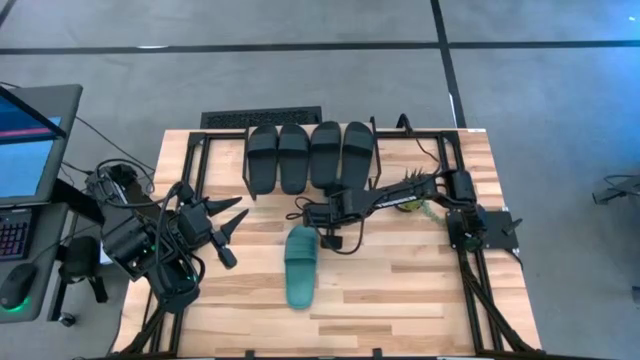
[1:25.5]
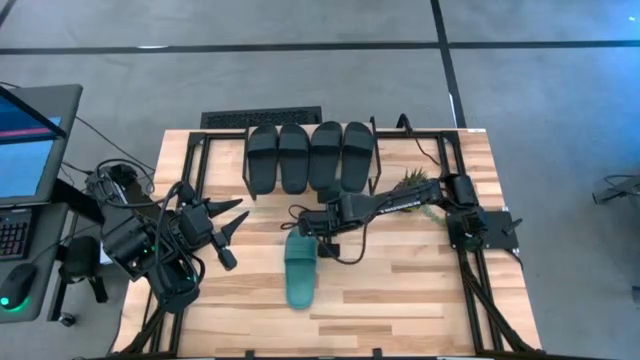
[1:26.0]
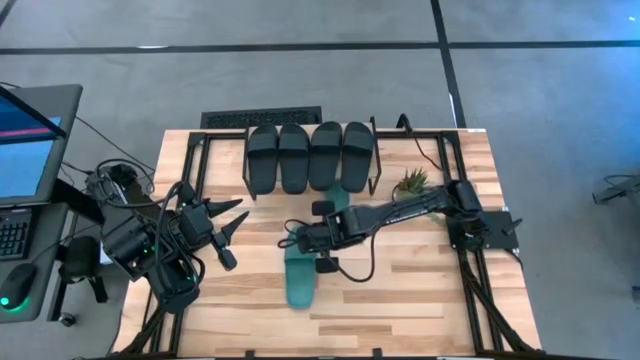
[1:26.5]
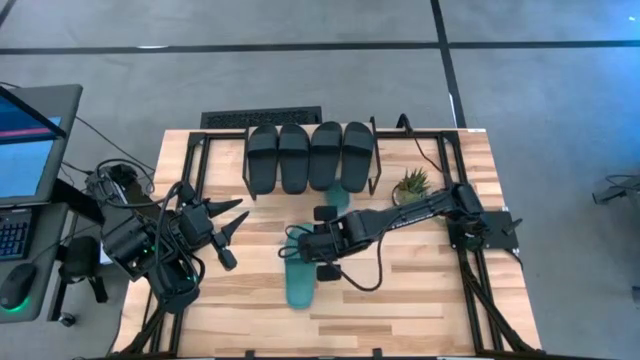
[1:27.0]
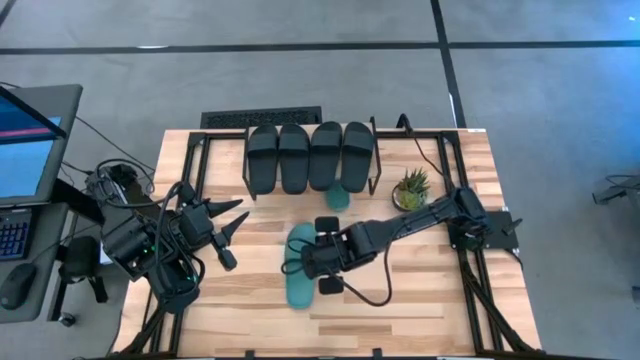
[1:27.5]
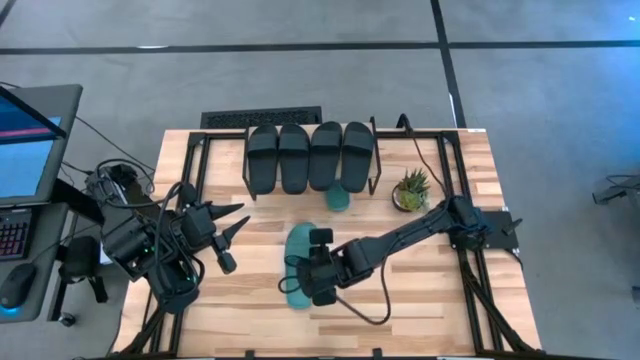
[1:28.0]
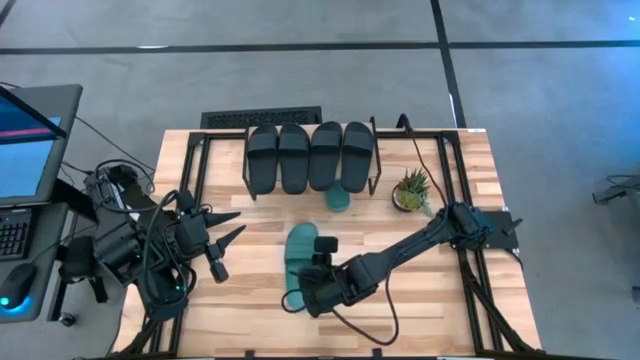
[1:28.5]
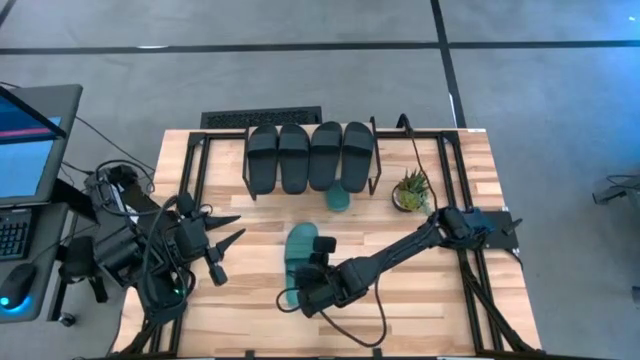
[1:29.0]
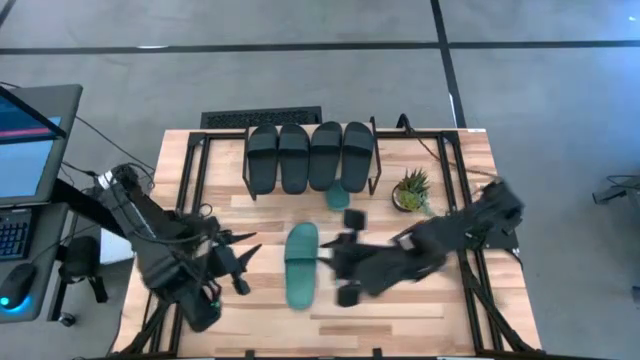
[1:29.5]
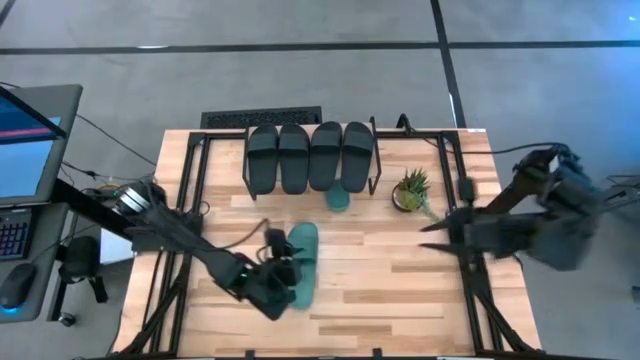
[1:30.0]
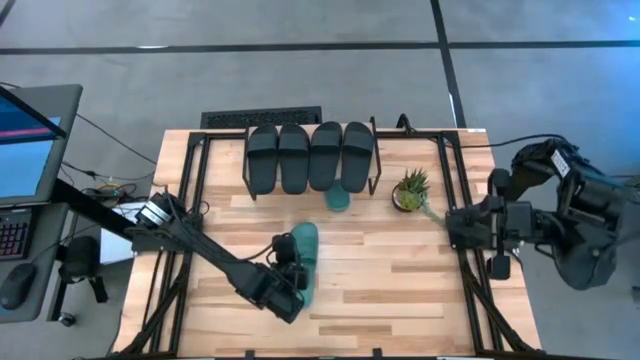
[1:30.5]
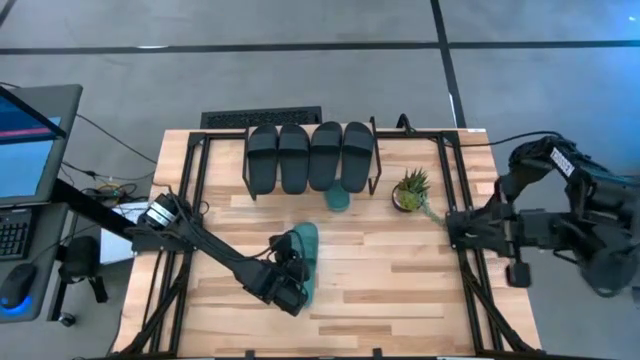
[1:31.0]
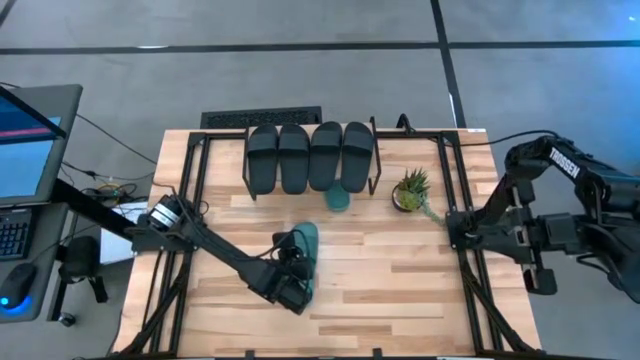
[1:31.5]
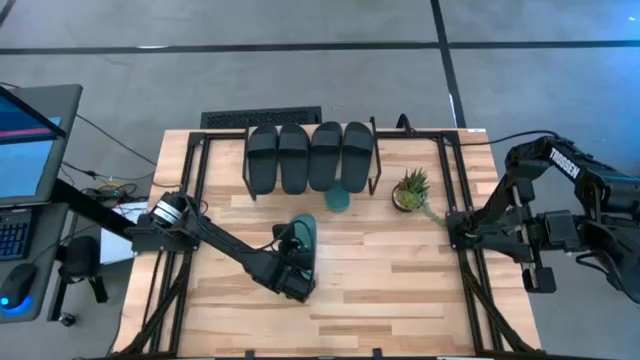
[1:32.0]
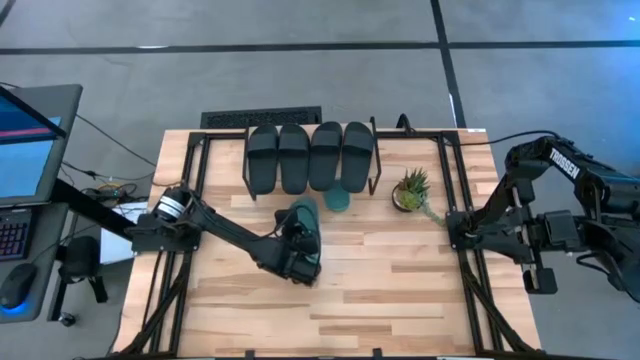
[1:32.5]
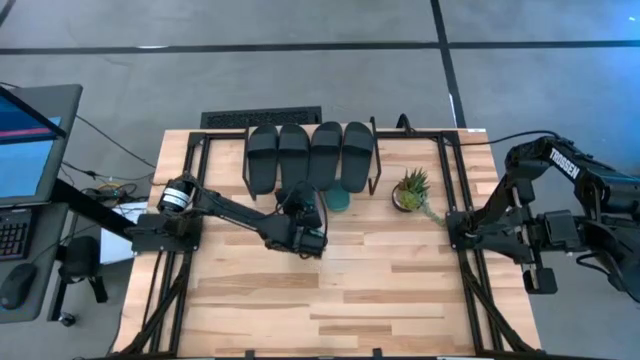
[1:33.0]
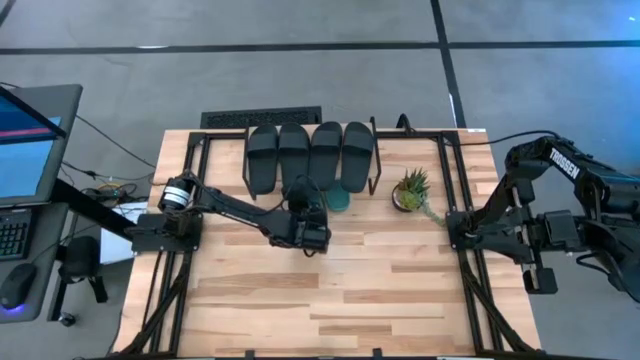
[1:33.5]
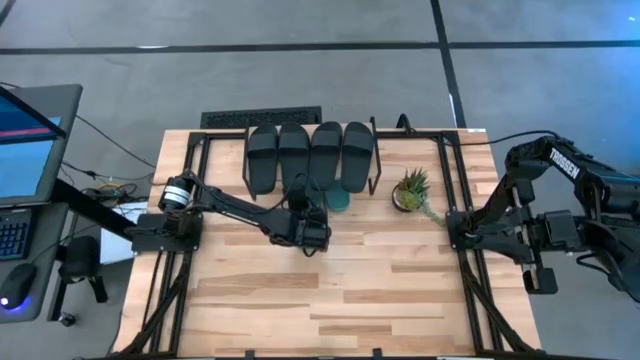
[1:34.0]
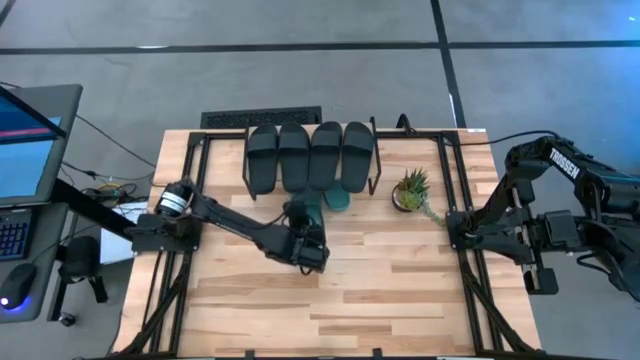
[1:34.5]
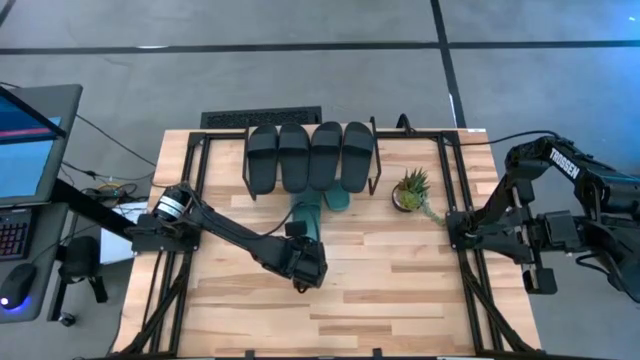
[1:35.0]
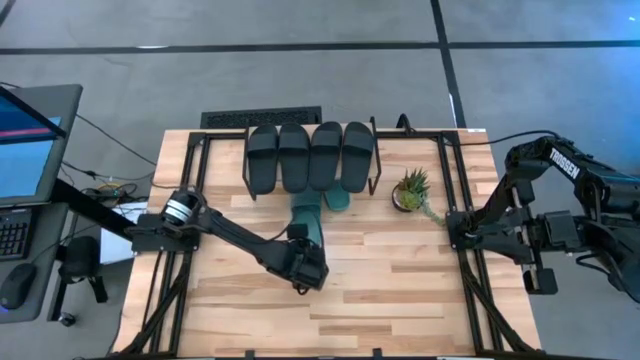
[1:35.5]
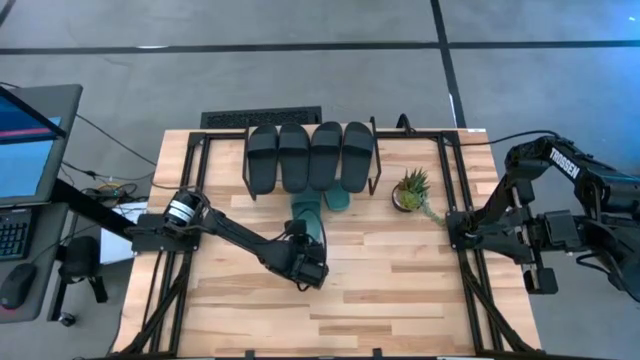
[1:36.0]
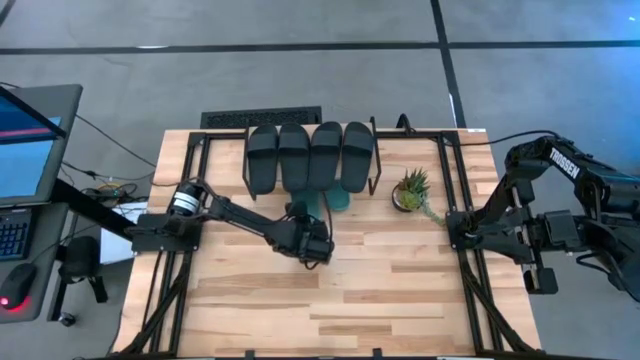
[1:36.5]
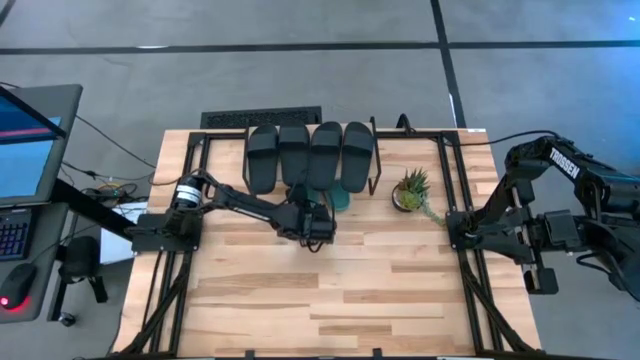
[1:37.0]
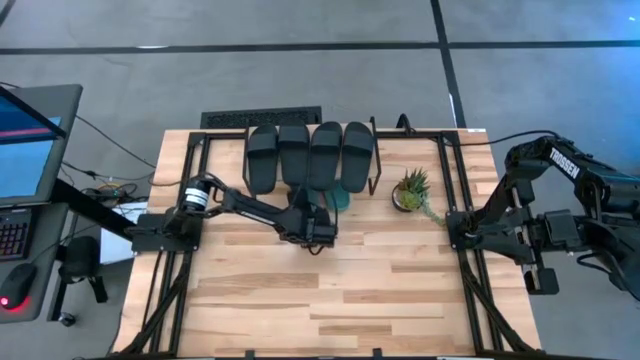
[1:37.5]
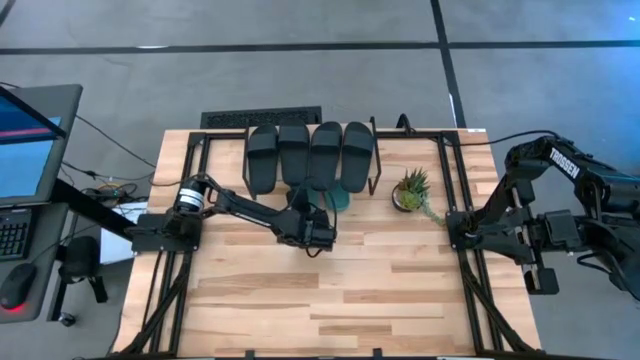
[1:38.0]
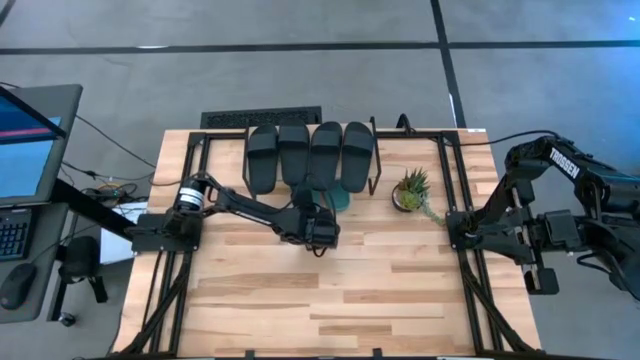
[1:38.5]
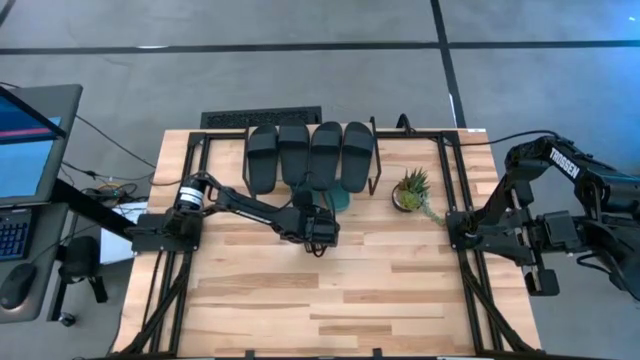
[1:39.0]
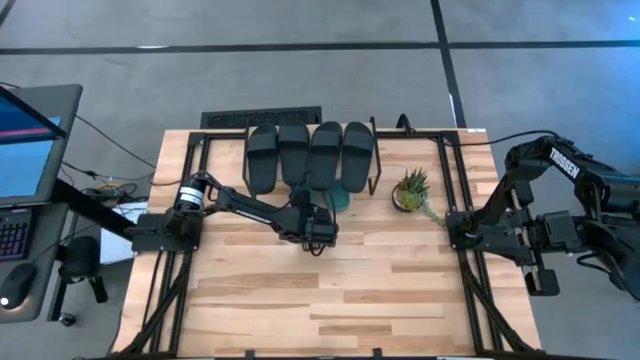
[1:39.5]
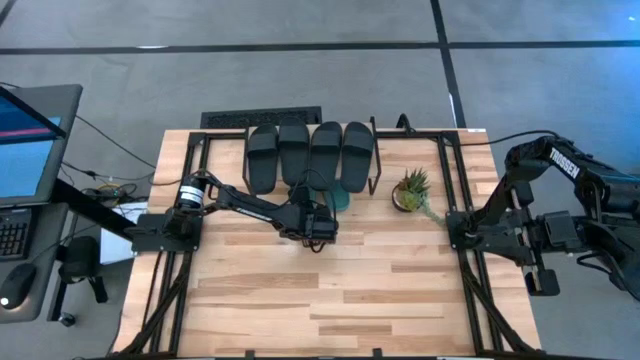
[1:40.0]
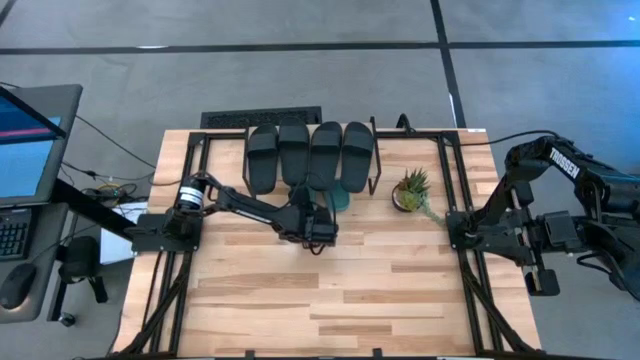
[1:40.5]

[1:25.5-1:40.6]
Task: Pick and place slides into the shelf
Put the green slipper under the shelf

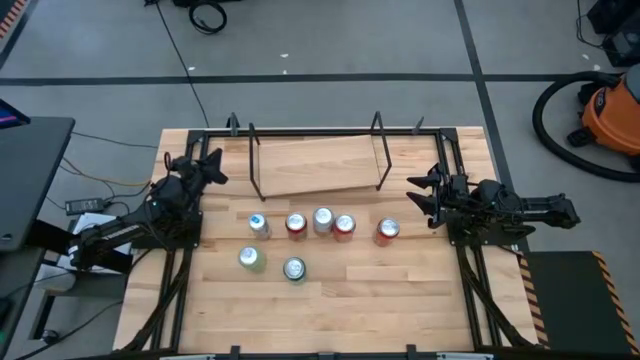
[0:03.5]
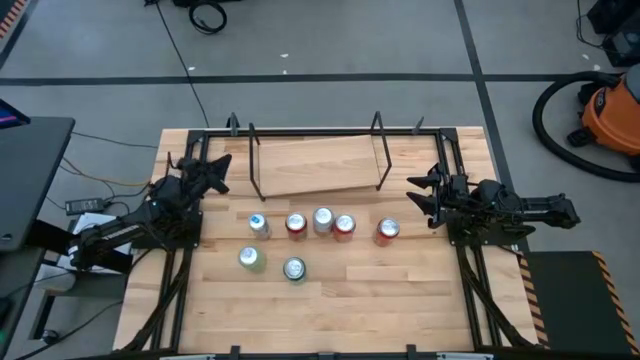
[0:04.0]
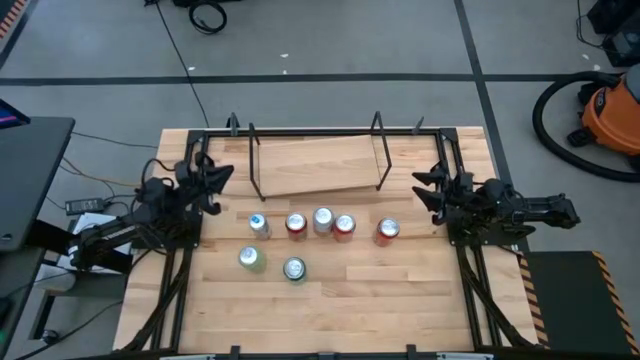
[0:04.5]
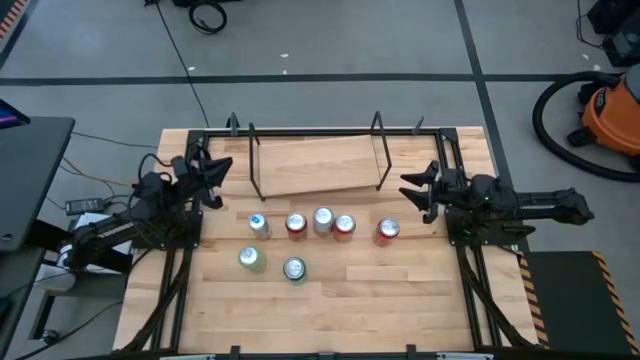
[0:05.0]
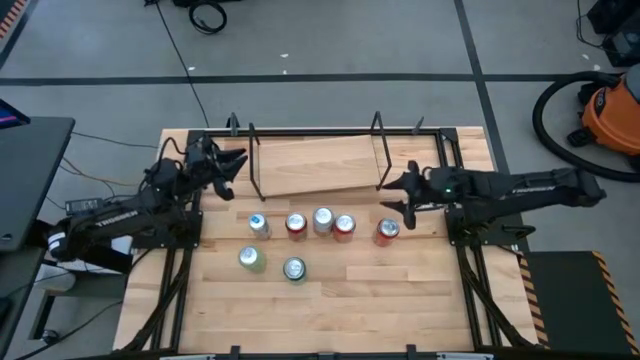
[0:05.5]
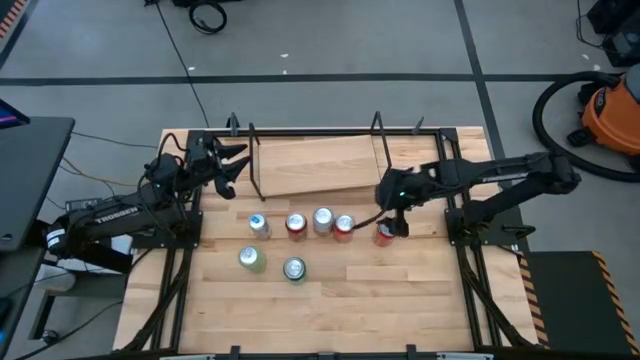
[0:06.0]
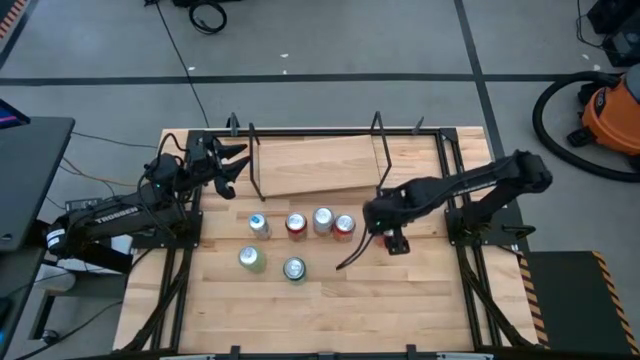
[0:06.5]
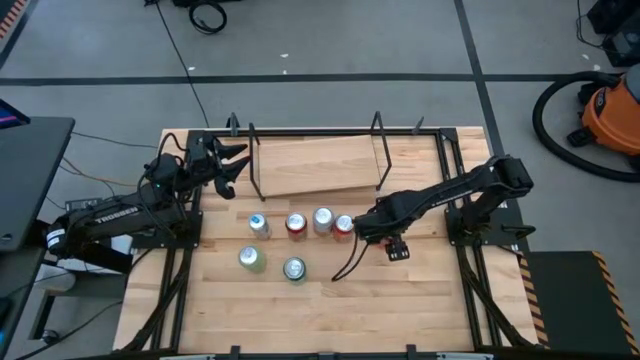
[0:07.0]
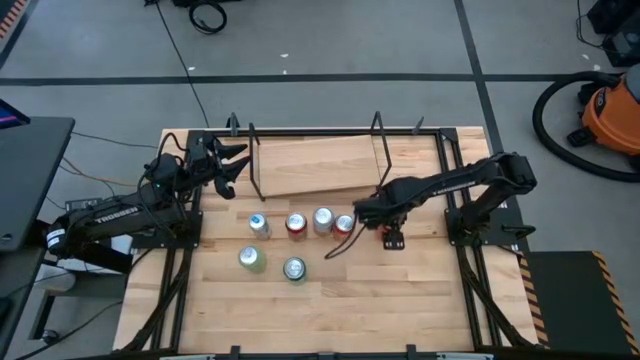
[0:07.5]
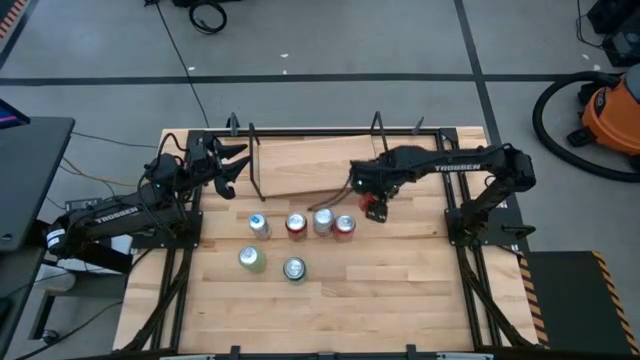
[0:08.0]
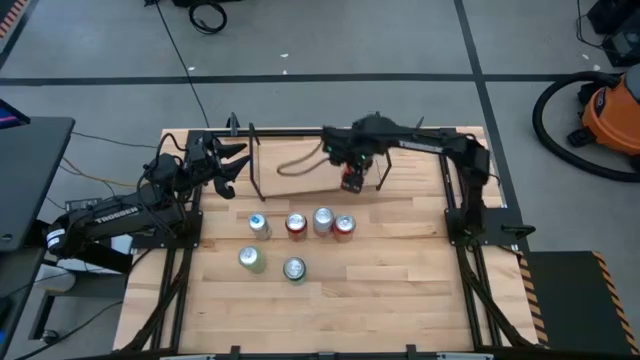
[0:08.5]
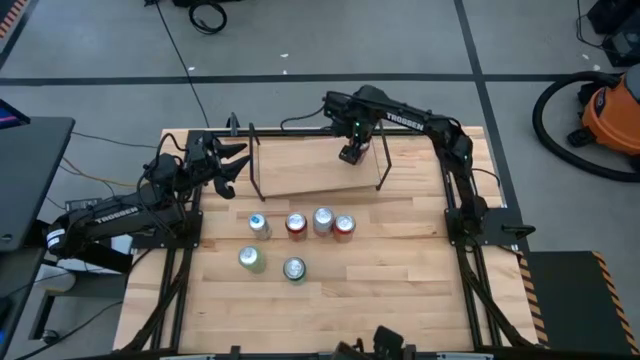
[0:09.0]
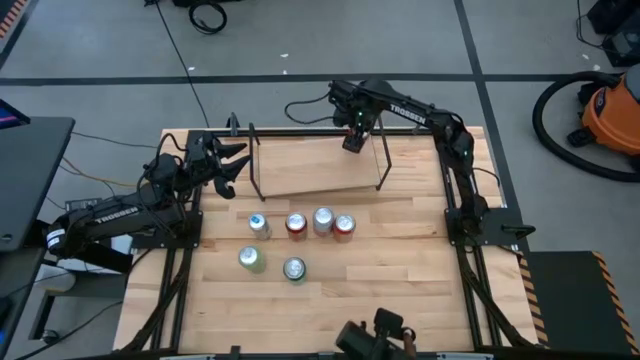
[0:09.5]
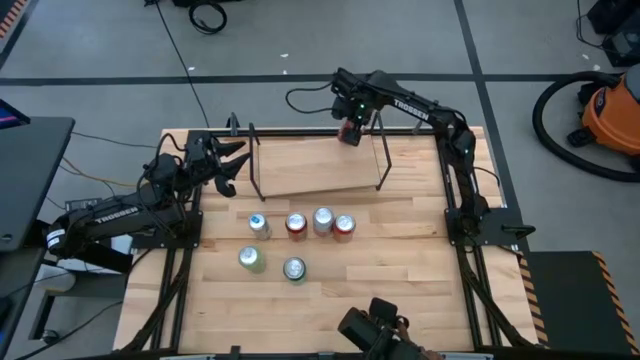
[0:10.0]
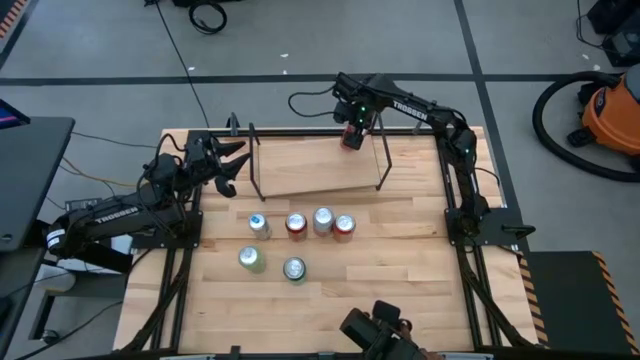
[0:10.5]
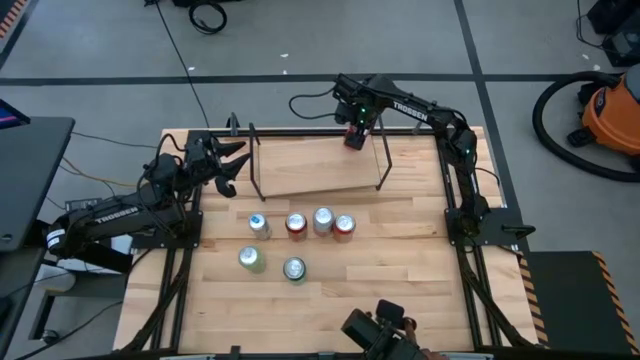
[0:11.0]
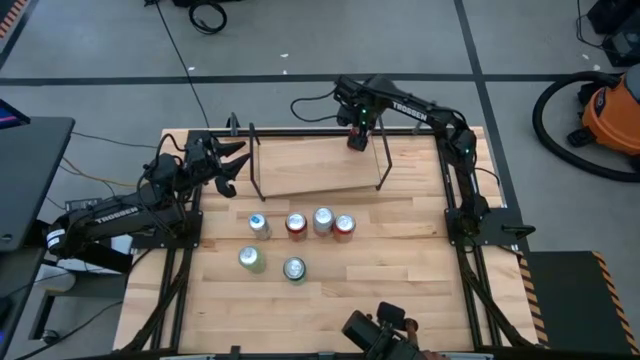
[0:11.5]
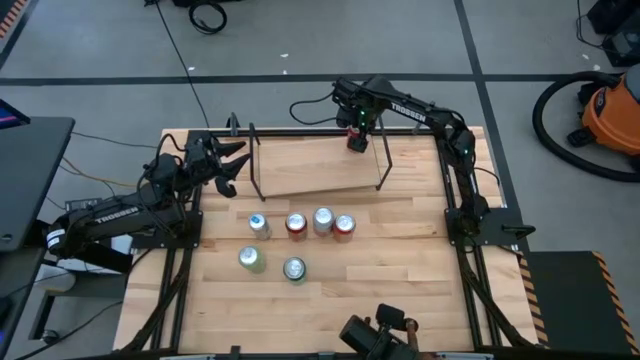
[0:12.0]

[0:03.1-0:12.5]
Task: Place canned beverage on shelf
Put the red soda can on the shelf
